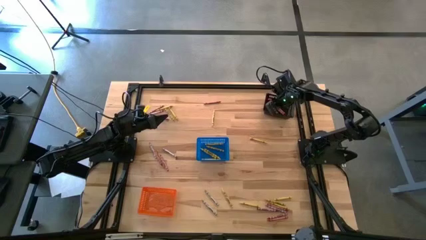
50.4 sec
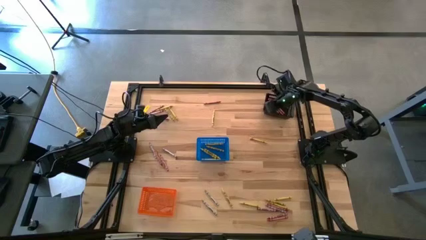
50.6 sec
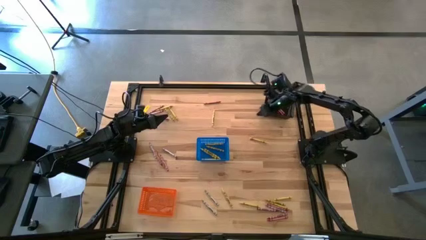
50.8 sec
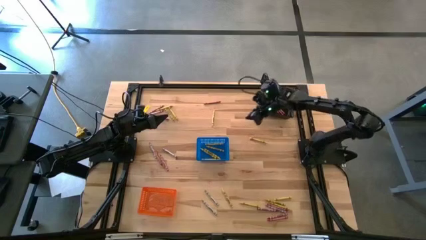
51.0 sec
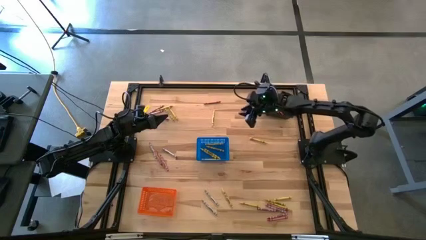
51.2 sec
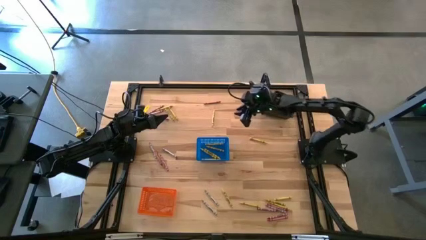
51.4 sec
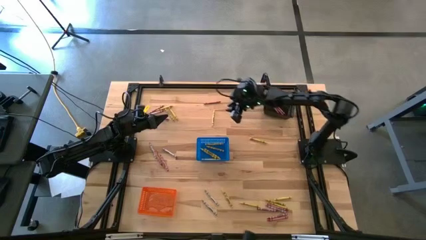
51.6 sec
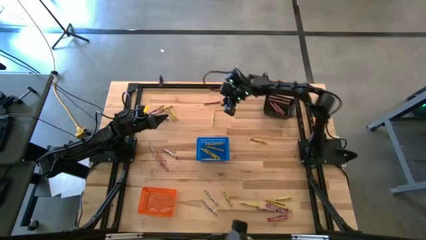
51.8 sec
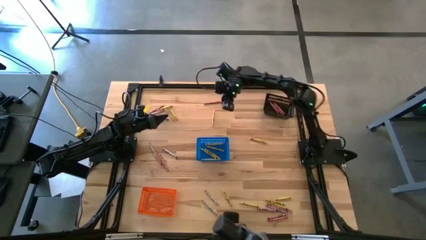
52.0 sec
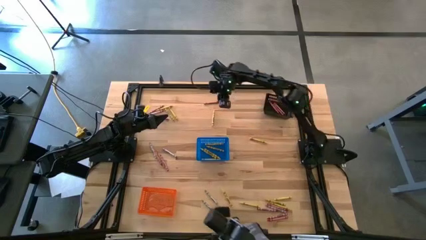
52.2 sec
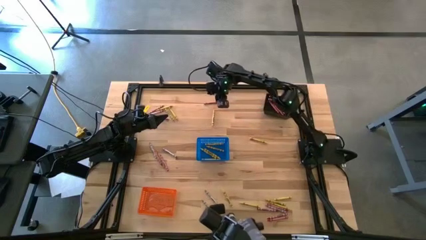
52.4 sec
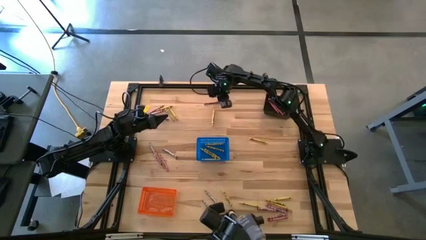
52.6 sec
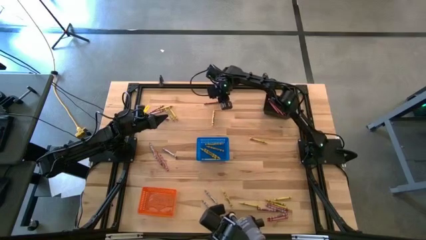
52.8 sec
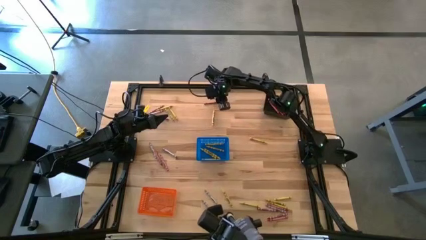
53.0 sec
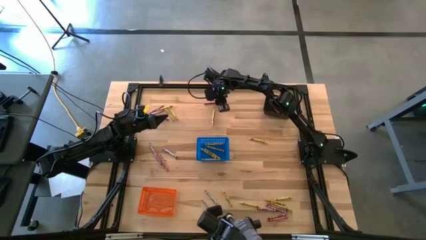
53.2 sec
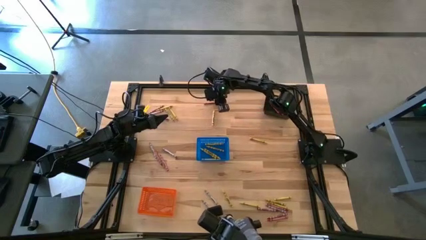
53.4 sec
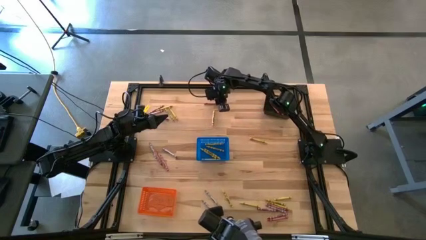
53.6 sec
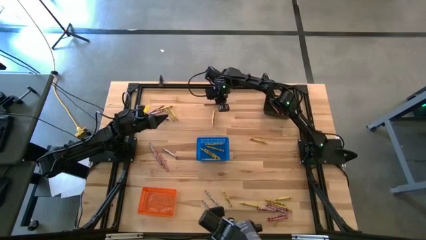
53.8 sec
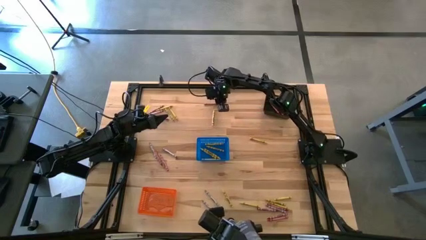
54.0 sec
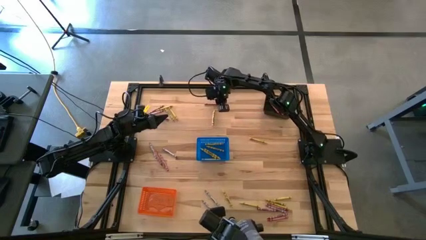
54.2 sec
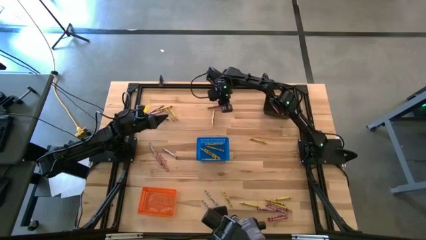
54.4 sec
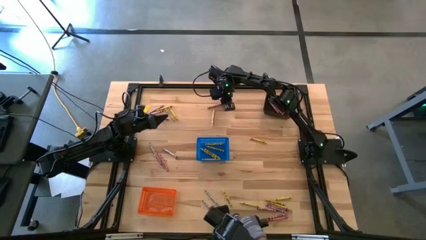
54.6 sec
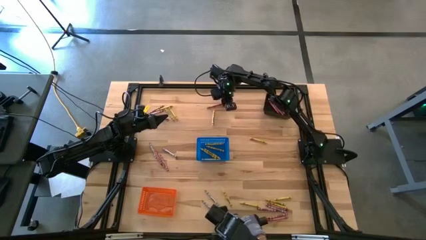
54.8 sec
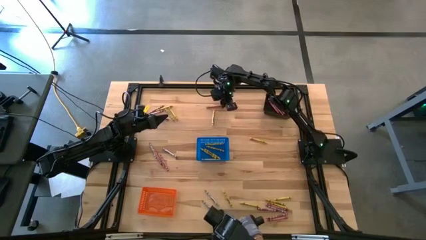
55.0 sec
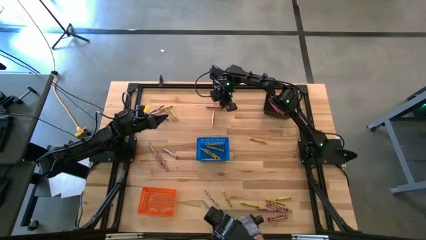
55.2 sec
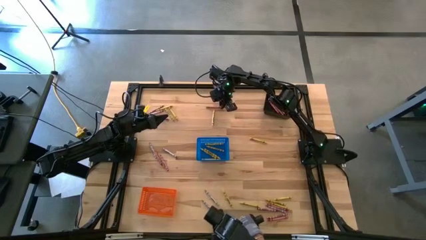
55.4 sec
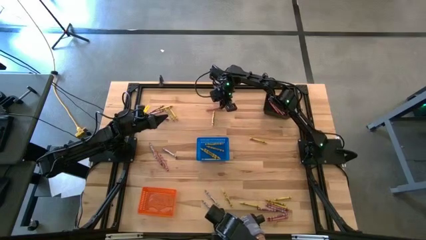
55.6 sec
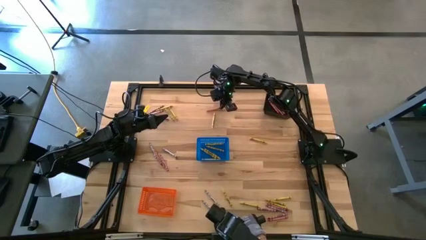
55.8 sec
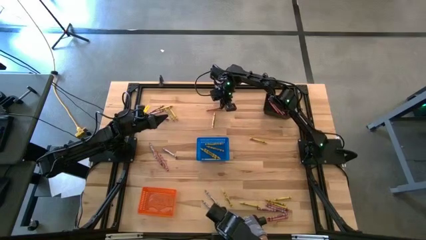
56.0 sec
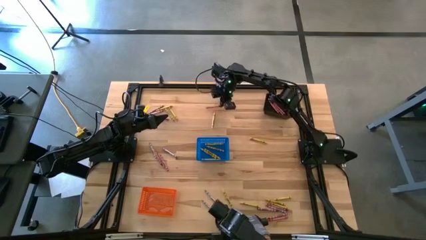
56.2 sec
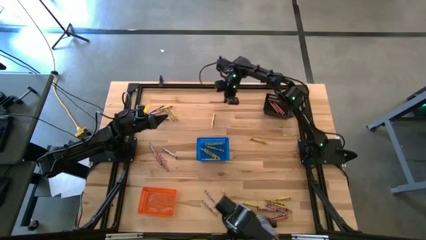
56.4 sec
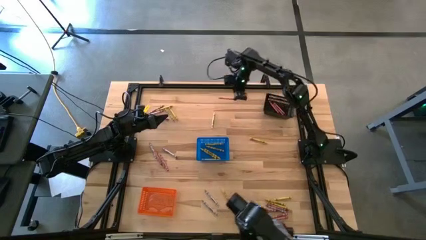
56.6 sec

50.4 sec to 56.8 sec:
Task: Sort crayons
Put the red crayon into the black basket

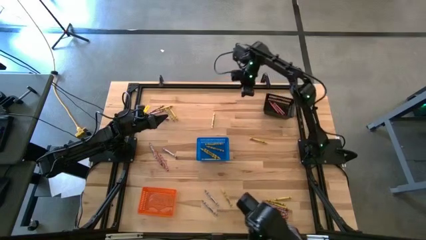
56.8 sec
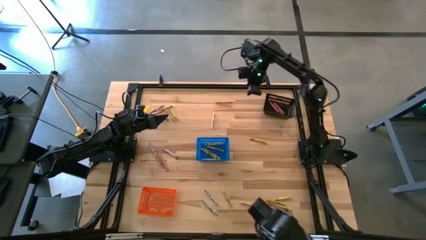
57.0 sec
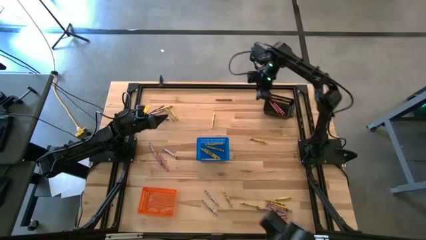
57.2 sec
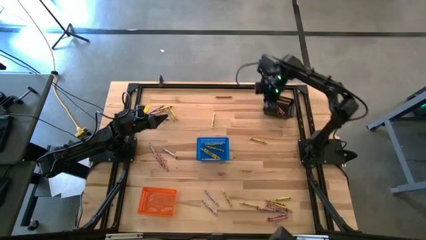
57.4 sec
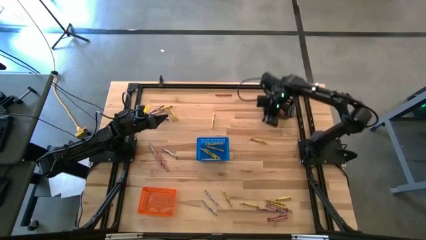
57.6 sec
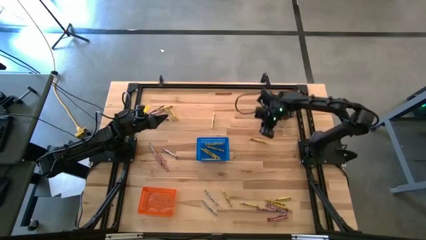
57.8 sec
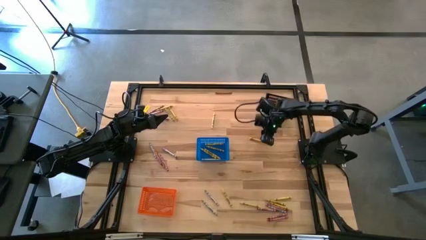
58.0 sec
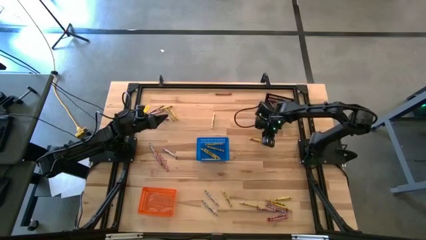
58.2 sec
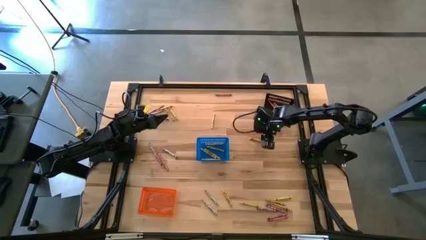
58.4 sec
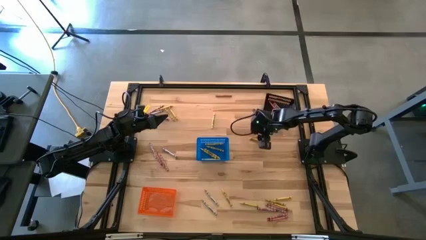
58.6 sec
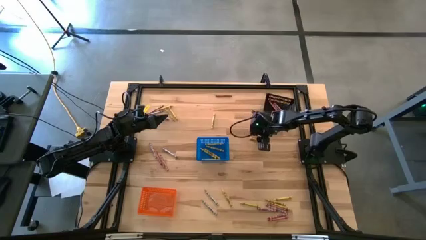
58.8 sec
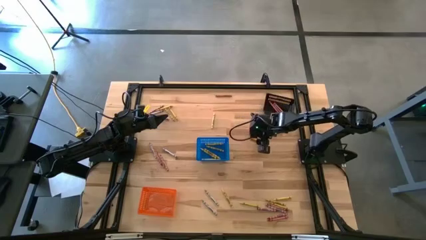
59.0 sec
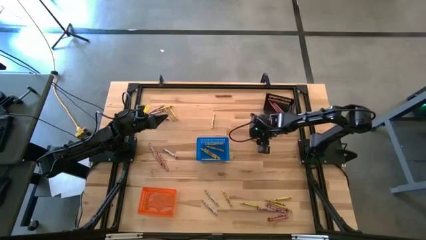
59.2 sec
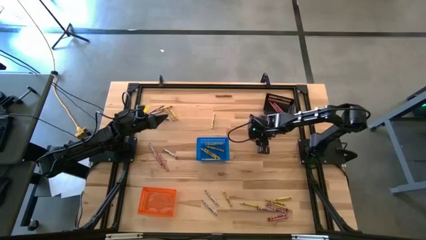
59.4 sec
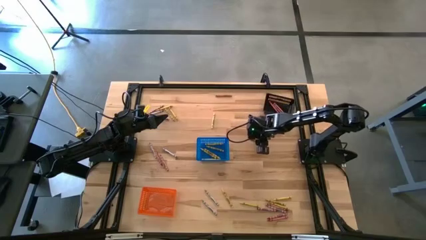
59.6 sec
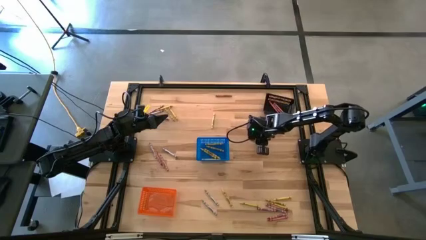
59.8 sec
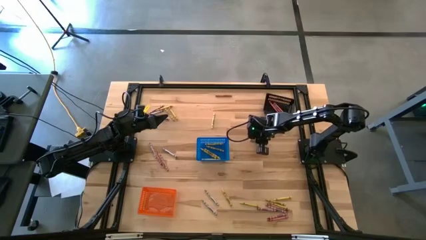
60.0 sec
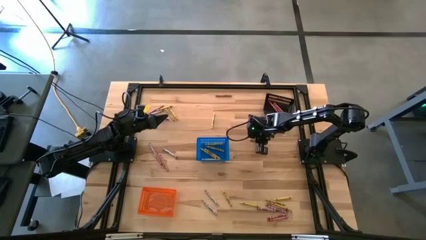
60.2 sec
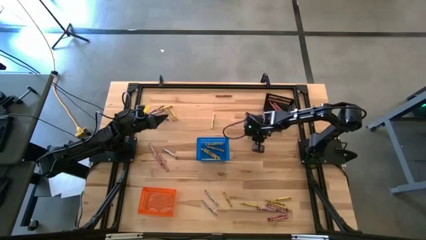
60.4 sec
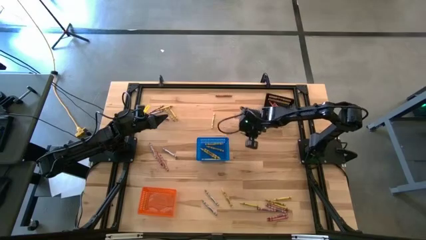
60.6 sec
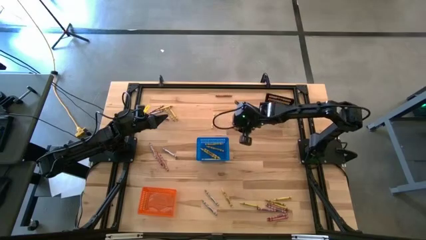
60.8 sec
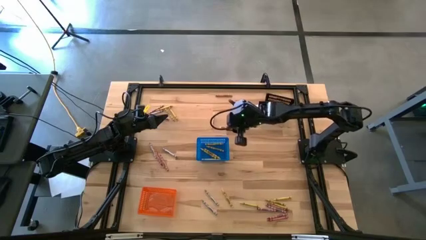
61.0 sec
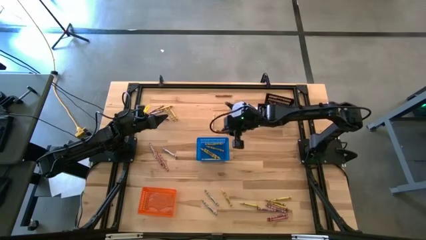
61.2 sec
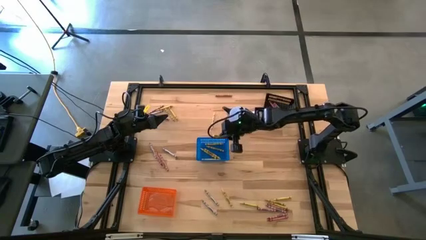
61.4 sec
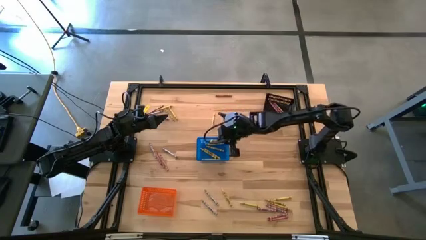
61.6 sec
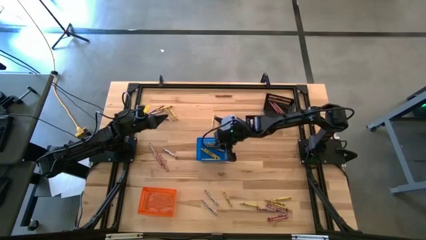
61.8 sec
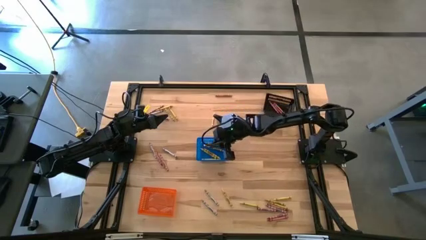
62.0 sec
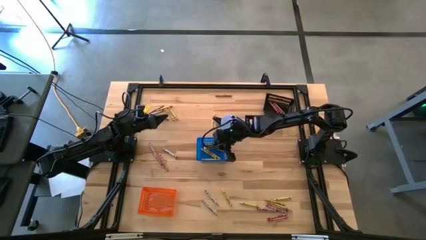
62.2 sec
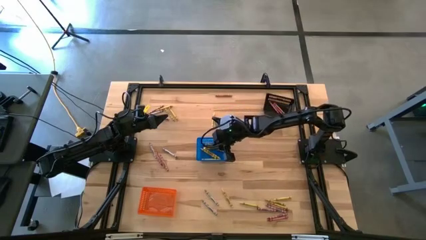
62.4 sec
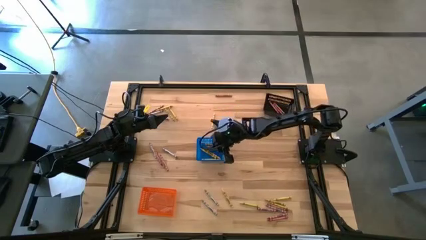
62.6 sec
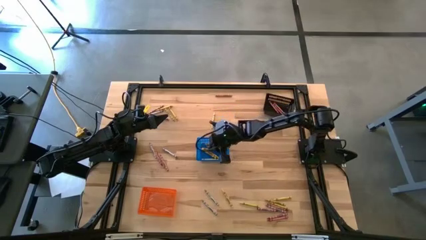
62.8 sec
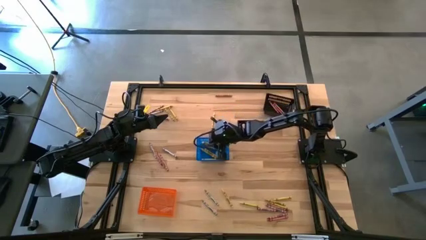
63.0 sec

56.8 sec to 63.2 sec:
Put the yellow crayon into the blue basket

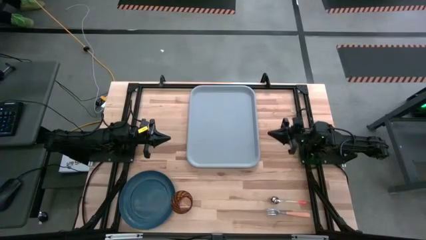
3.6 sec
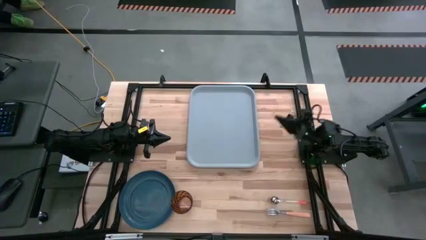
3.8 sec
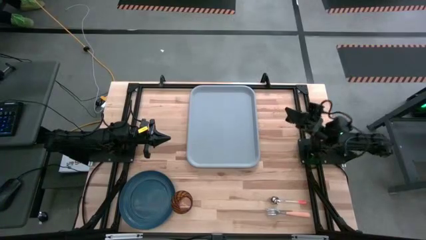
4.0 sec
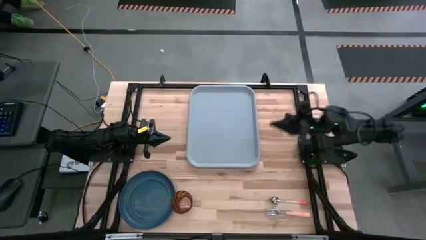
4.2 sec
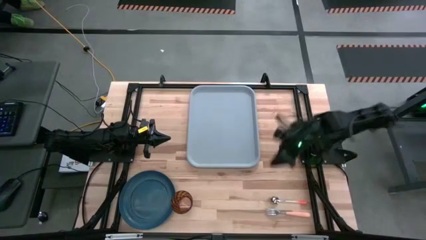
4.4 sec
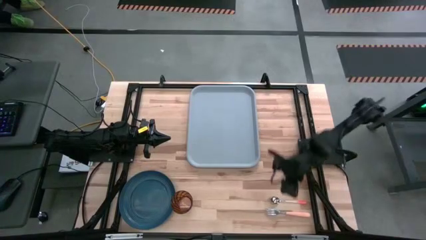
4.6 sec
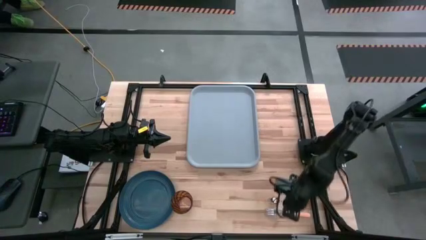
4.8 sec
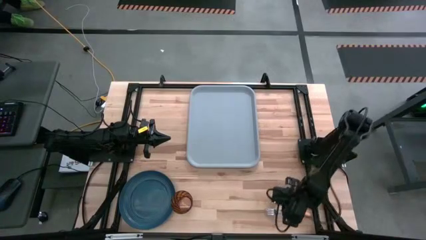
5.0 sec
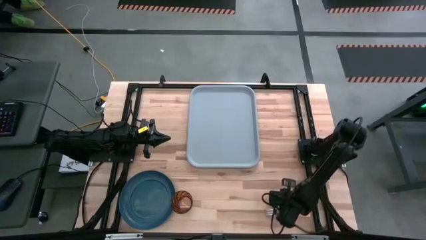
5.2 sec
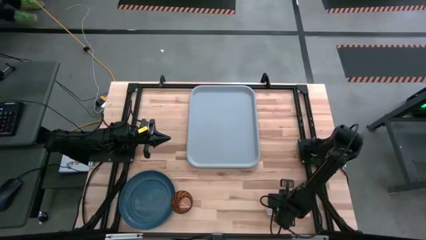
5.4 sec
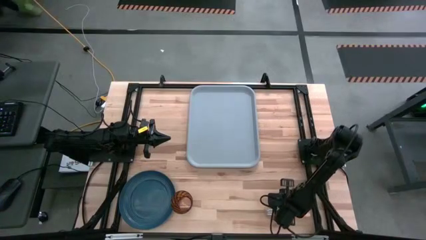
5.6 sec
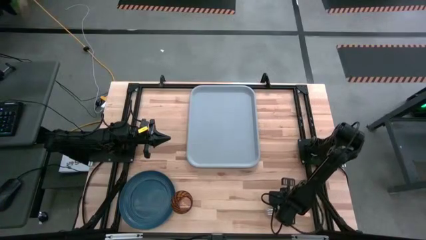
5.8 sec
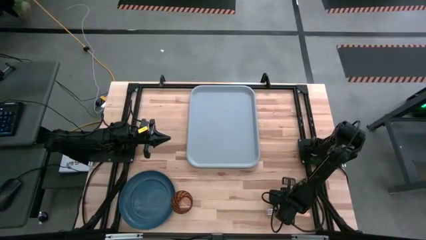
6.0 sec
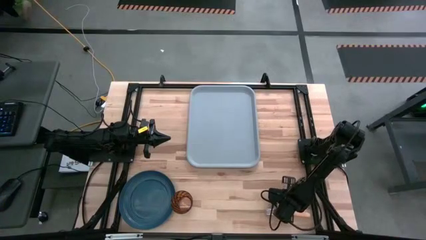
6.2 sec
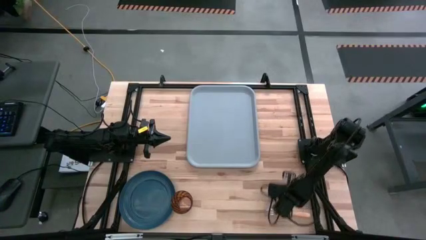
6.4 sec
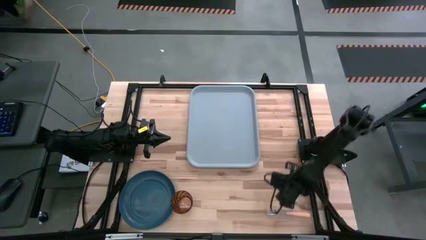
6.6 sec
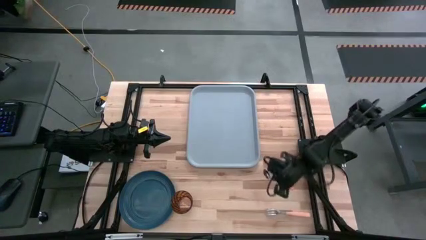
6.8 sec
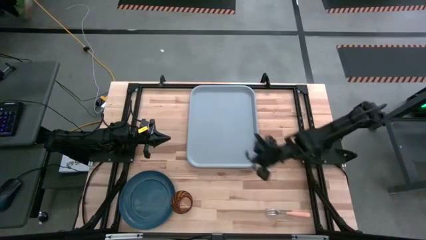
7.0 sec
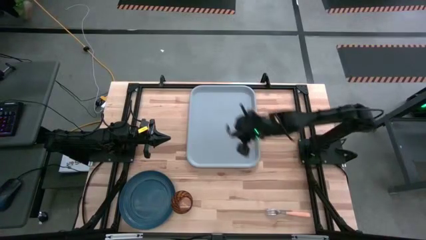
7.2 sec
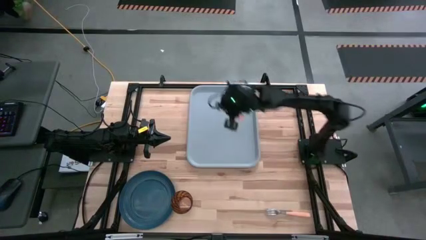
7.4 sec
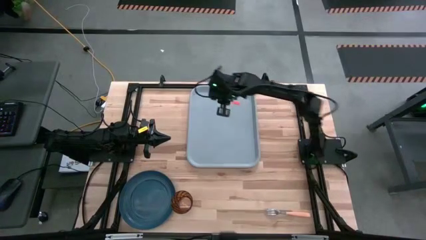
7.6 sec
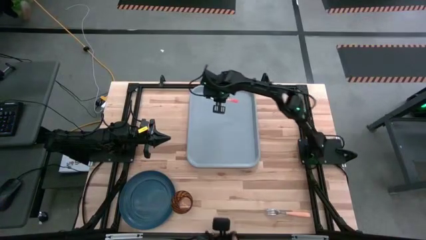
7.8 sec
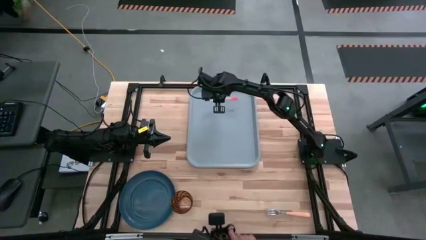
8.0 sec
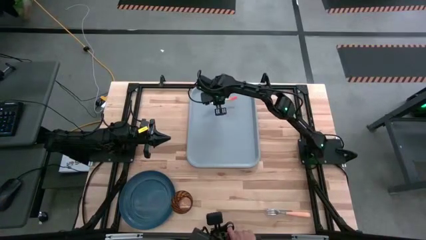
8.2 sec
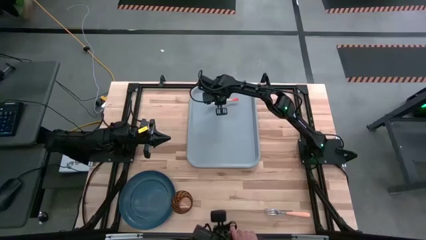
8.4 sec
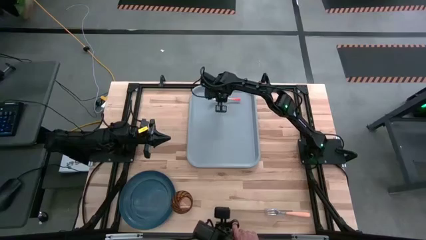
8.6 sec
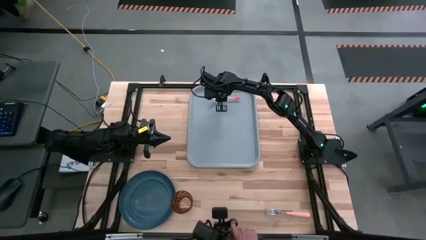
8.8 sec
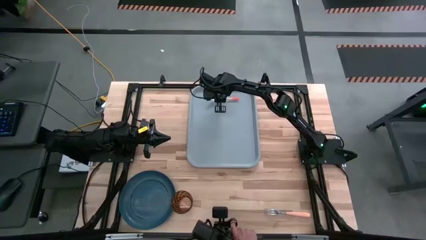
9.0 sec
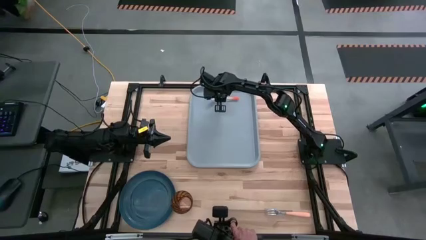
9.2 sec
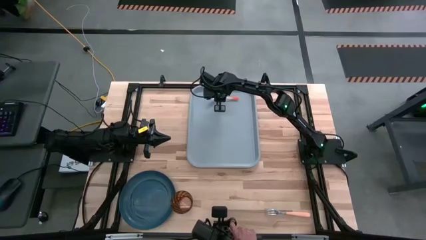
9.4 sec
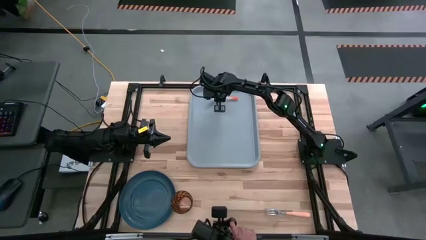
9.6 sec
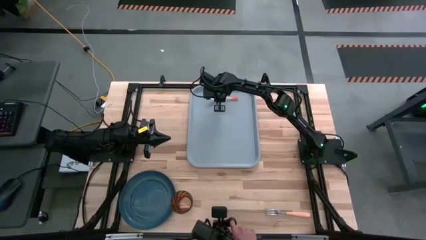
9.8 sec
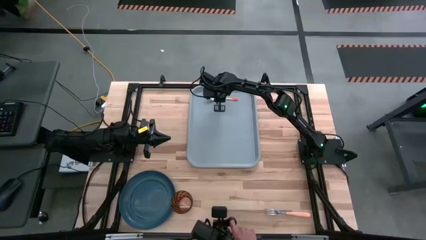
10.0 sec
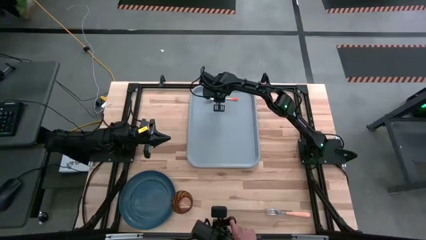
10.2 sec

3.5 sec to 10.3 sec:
Task: Pick and place plate/cup/fork/spoon on tray
Put the orange spoon on the blue serving tray
